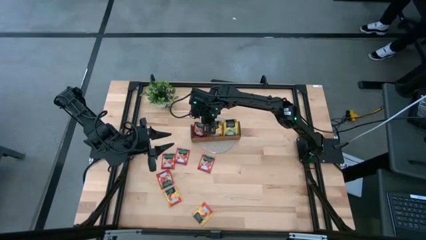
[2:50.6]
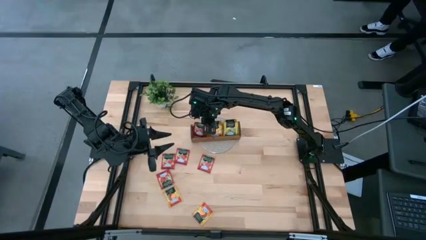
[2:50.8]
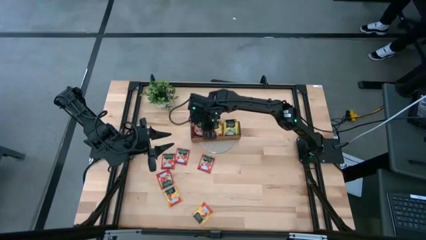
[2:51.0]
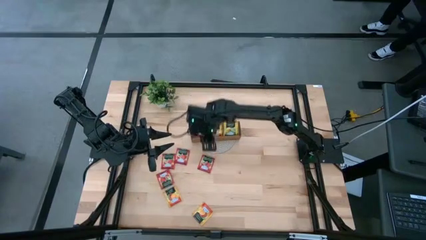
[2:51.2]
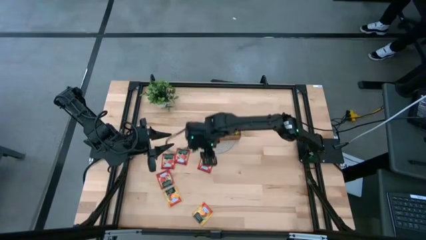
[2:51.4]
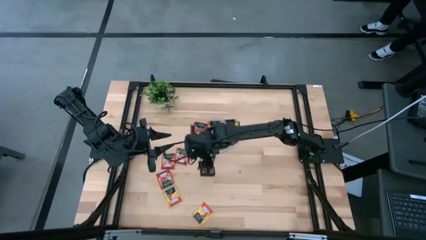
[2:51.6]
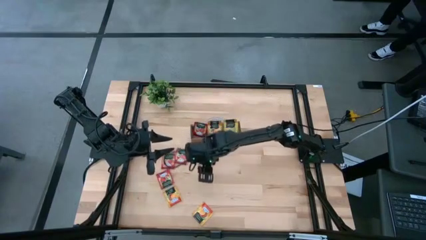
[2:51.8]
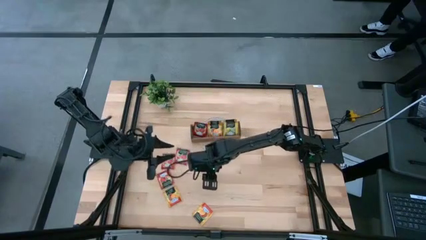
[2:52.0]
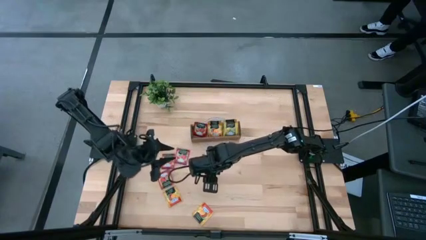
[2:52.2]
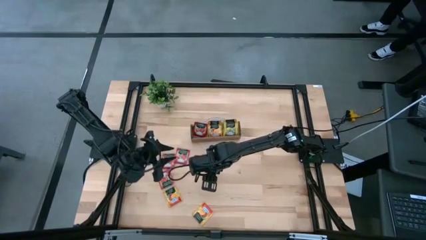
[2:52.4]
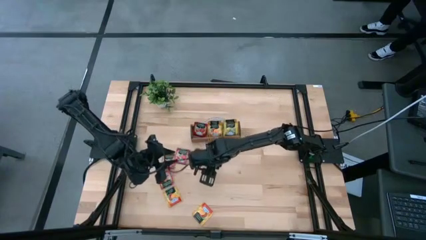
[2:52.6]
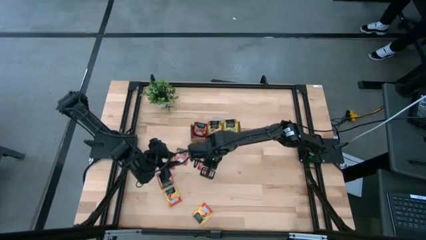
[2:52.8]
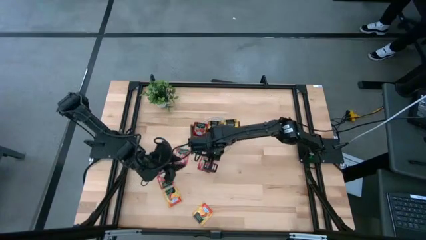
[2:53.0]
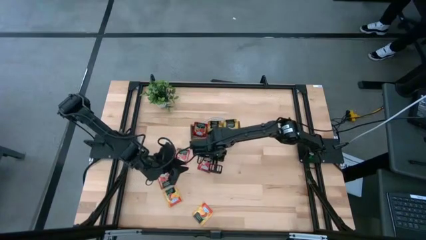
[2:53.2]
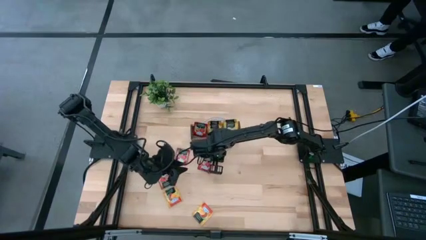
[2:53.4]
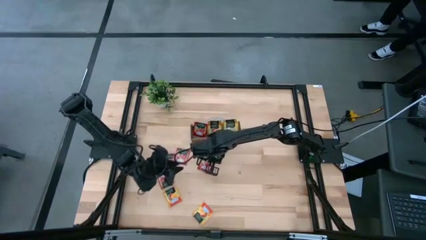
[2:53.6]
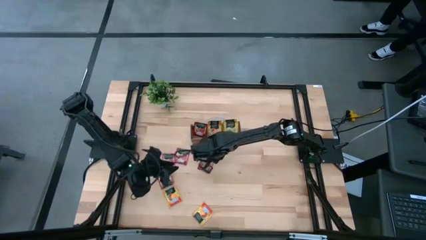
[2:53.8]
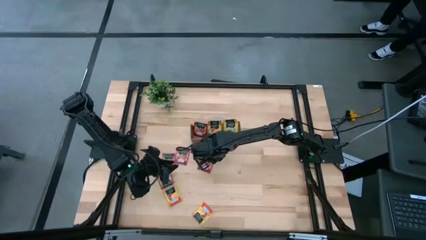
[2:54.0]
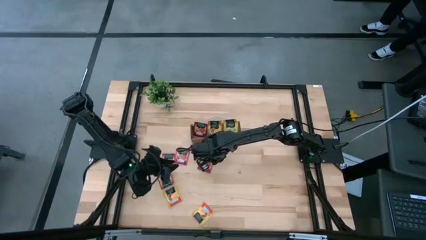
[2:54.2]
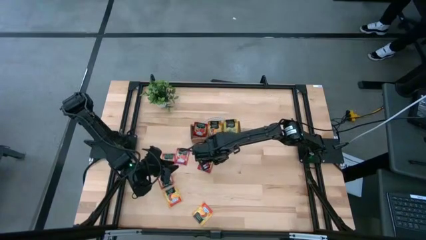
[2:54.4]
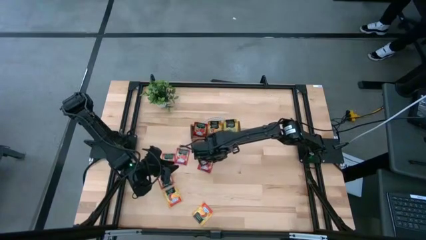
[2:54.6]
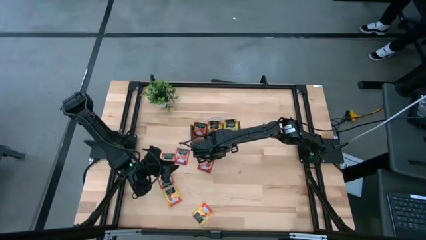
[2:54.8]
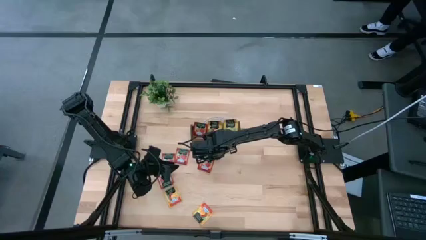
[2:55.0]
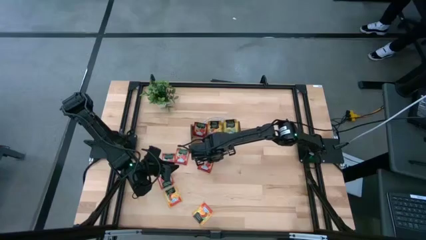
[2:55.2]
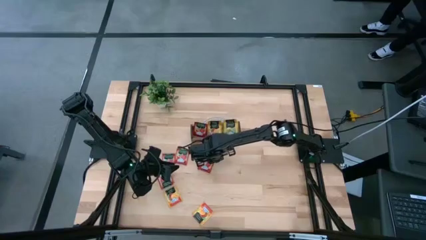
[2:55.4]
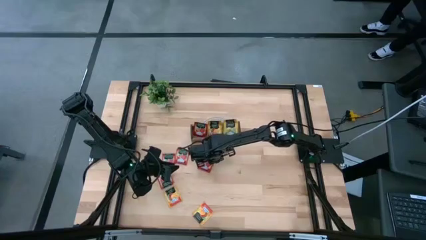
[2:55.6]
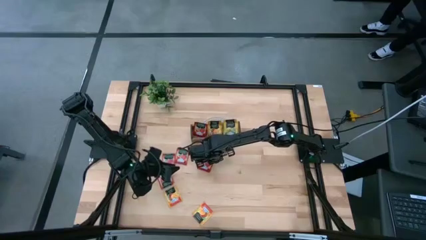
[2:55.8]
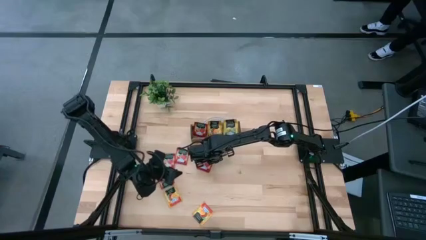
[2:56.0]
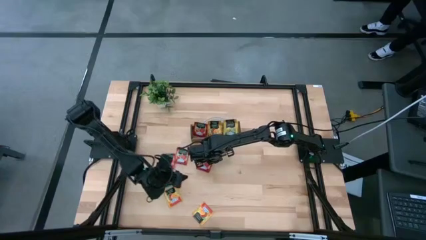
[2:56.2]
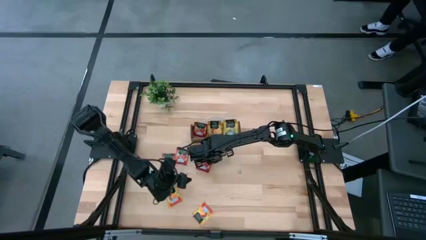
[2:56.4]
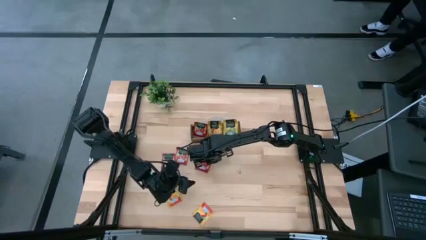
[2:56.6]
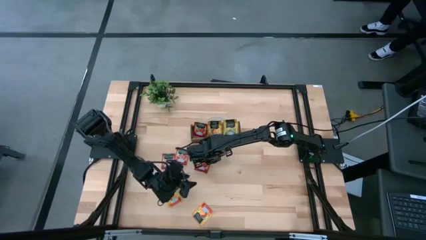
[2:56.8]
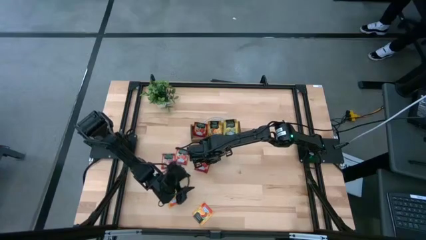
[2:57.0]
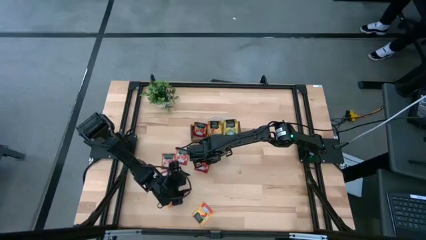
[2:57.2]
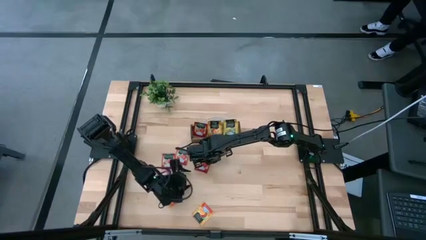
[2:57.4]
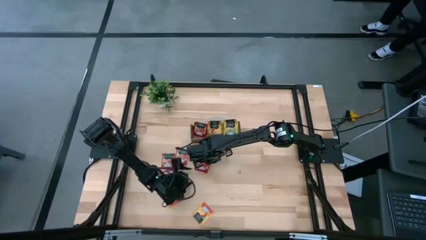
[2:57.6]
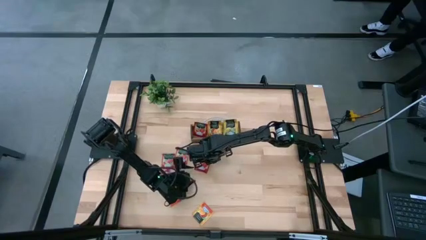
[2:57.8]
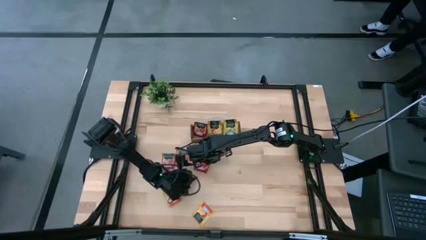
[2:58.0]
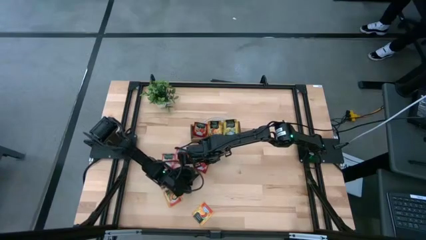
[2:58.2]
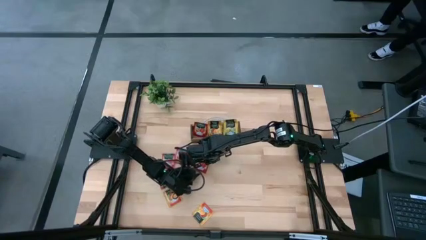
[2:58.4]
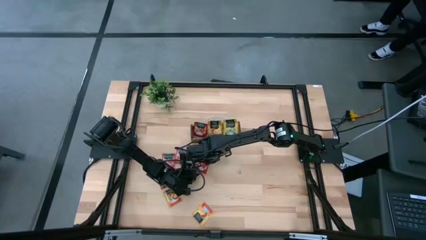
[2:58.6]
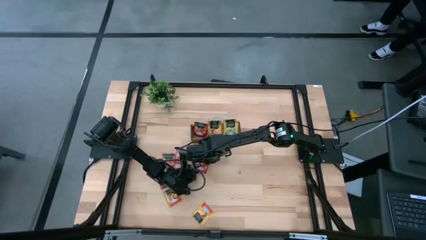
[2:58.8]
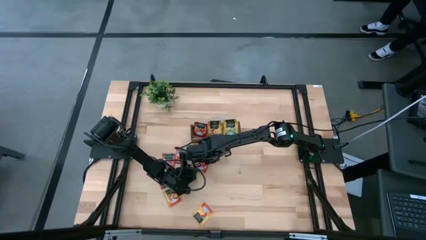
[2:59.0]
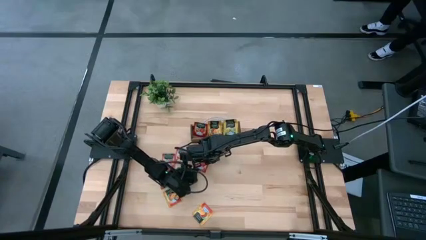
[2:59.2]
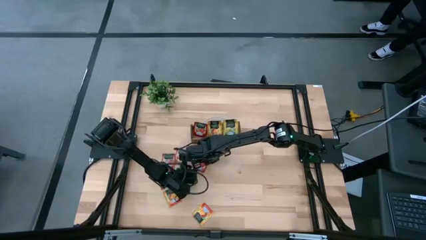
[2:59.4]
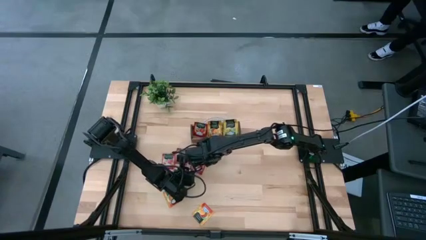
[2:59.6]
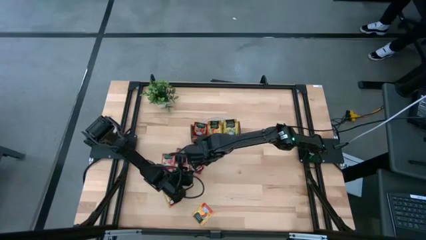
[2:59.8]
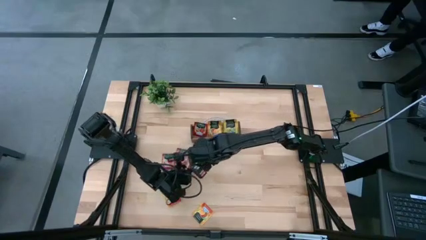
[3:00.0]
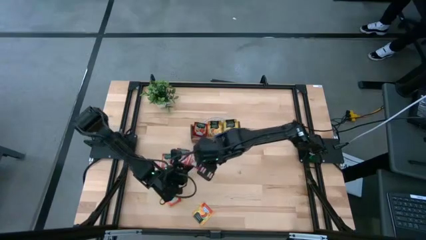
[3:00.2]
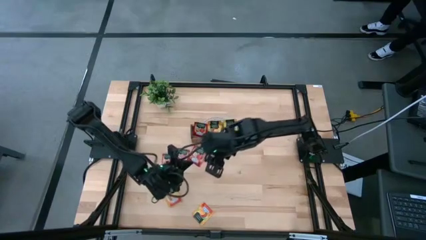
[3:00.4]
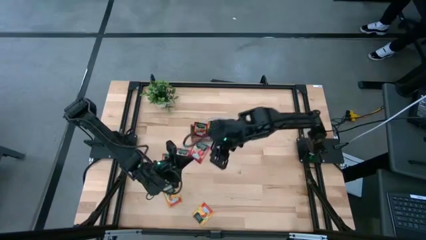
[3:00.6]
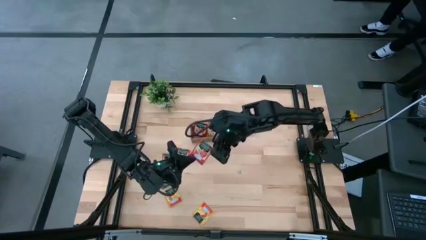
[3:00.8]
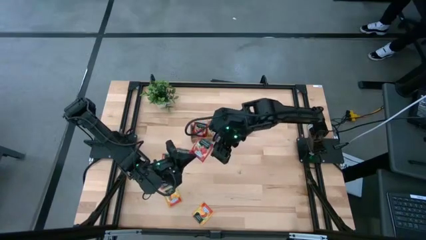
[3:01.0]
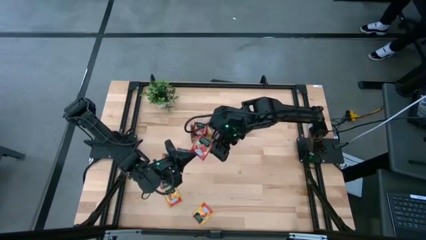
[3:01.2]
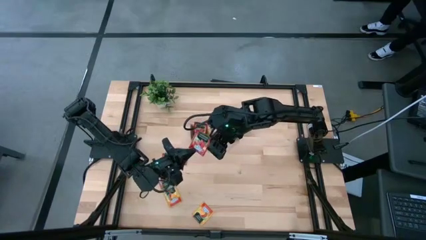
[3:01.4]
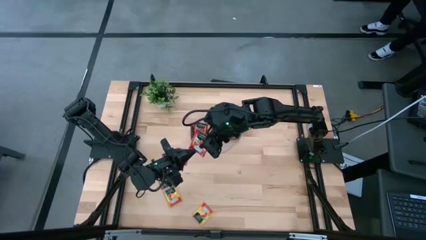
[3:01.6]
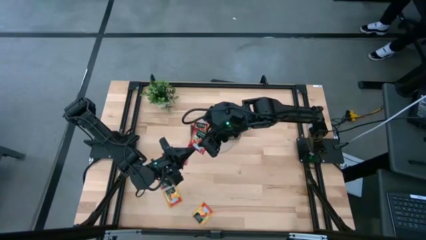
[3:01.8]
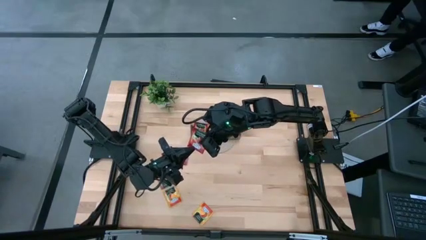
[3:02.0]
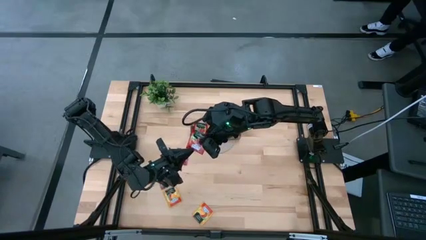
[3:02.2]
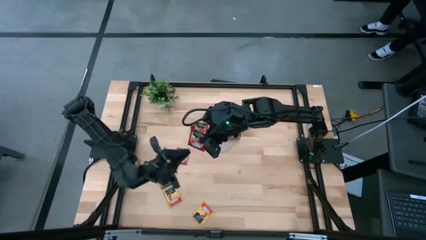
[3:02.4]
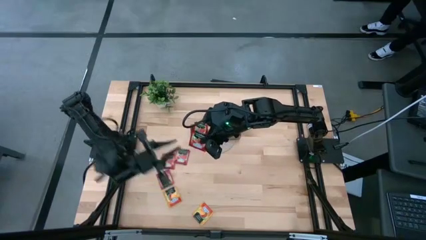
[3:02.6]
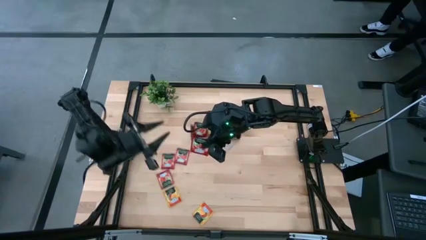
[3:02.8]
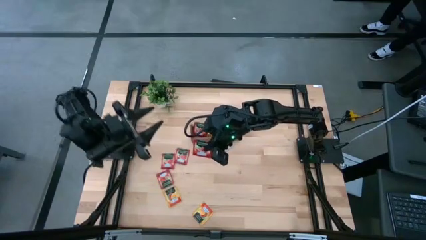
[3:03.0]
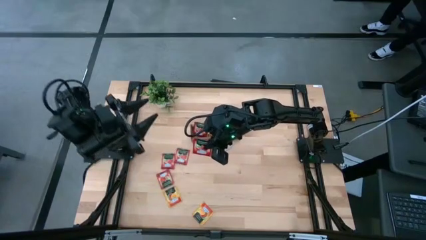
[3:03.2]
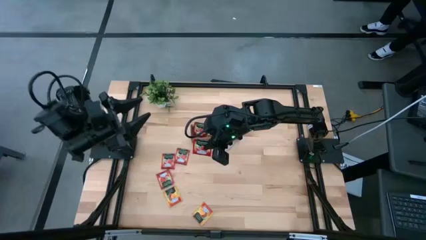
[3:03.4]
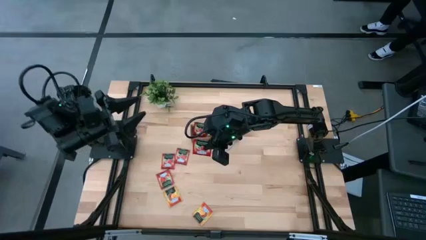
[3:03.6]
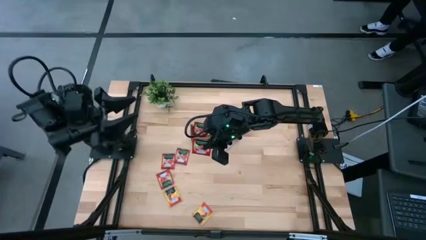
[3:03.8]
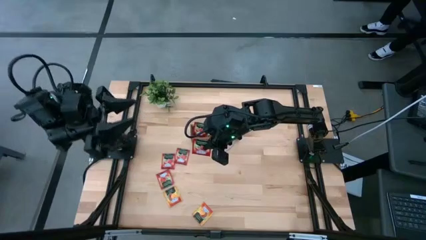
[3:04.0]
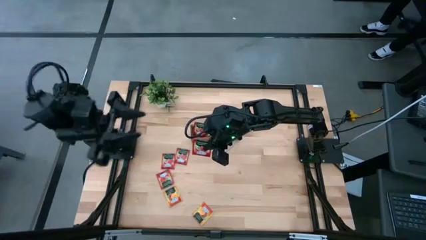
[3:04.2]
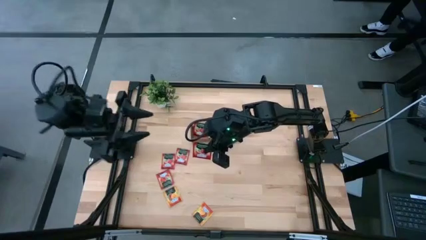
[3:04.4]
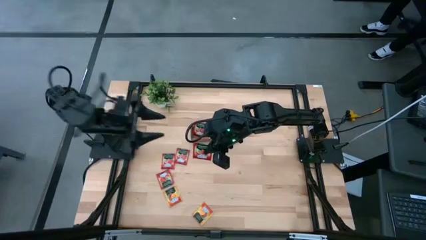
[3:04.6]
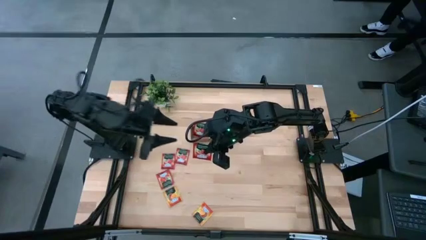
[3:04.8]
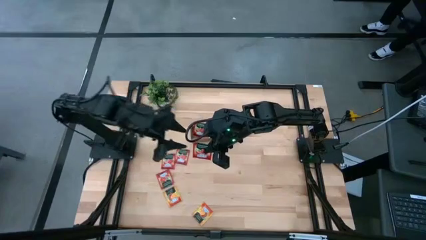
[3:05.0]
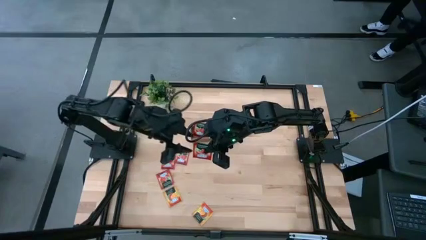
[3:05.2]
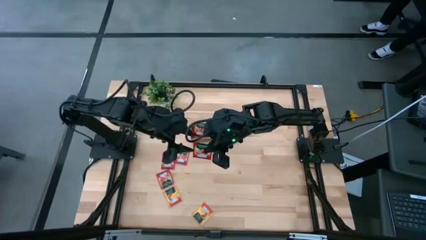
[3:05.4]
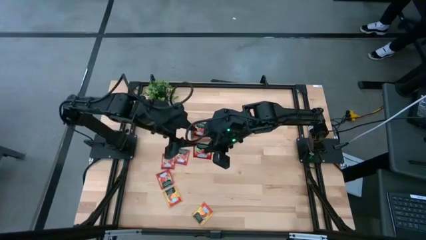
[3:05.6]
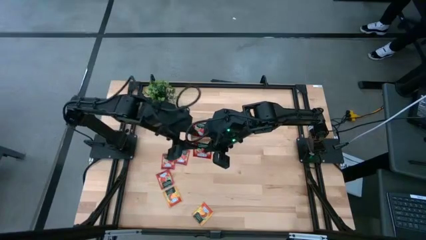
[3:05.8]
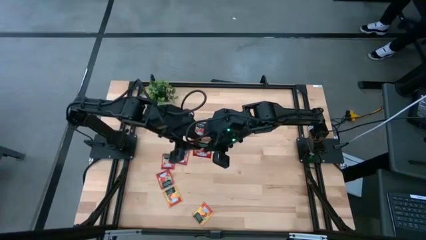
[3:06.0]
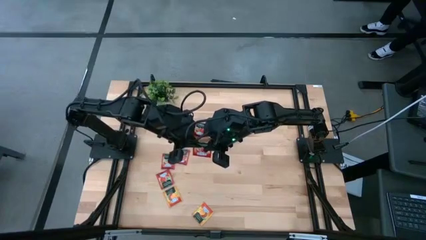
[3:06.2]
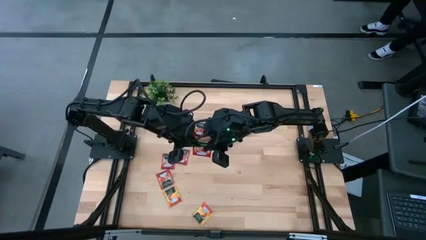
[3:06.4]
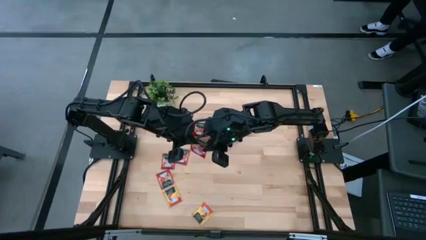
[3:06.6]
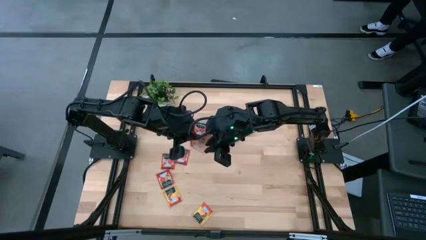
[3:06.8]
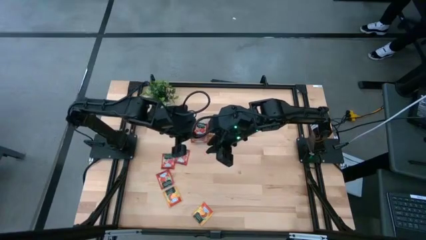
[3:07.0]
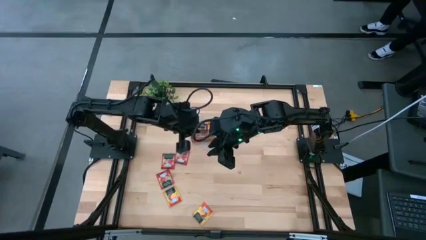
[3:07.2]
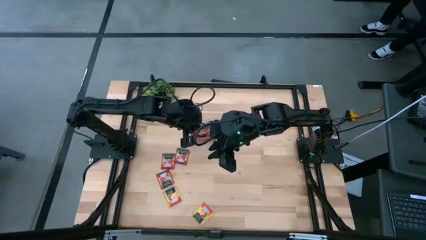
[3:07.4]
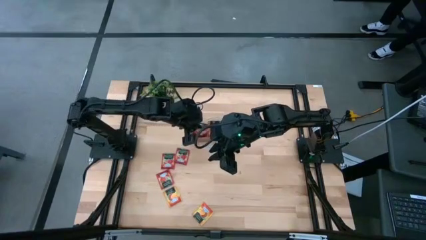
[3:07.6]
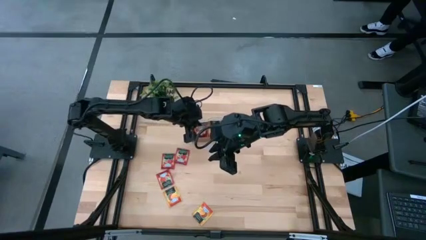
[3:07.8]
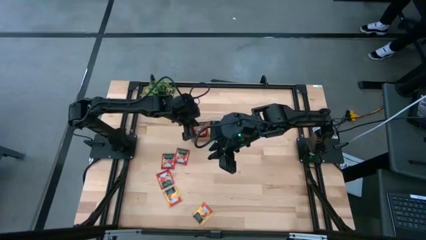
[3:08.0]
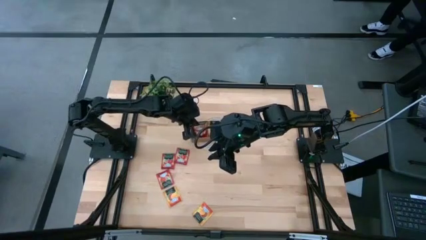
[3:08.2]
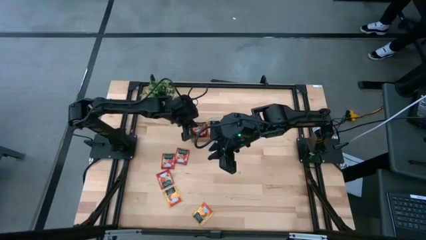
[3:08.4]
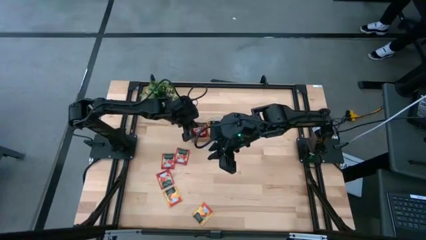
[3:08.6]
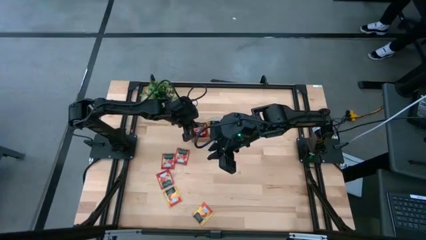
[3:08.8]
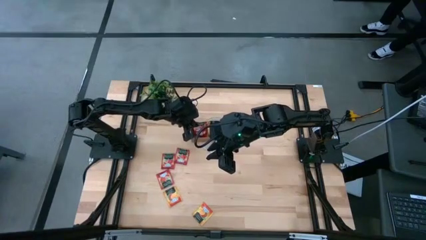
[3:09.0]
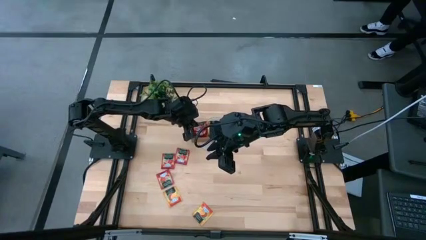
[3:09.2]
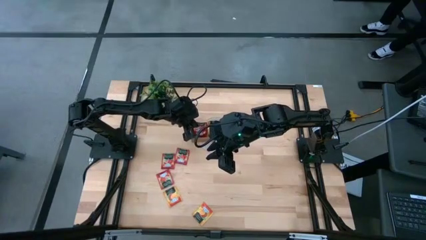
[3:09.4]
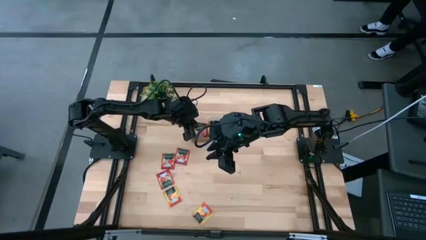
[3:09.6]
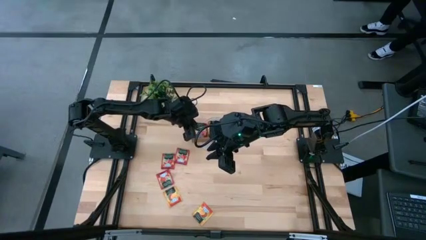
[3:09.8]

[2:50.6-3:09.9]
Task: Pick & Place Tea
Put the red tea bag into the left section of the wooden organizer
